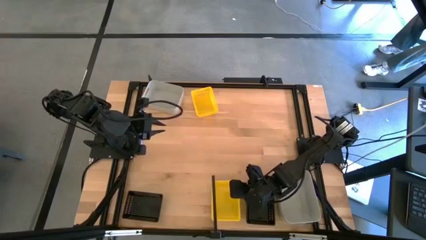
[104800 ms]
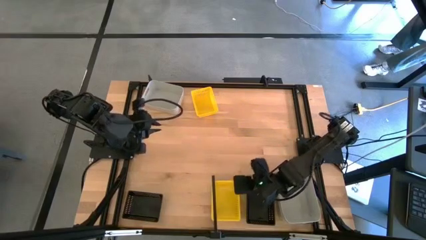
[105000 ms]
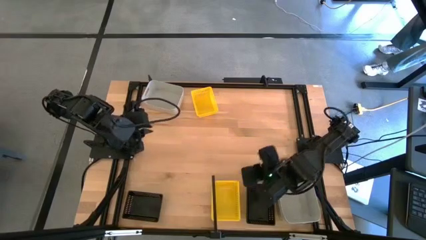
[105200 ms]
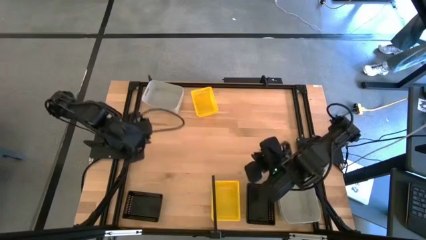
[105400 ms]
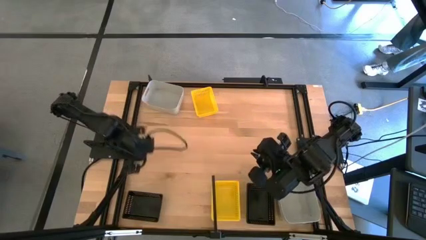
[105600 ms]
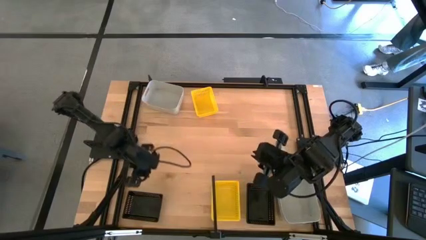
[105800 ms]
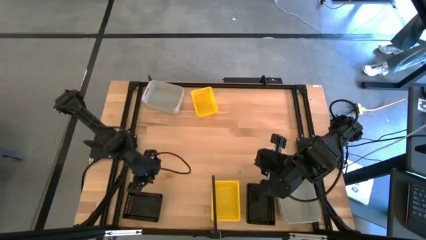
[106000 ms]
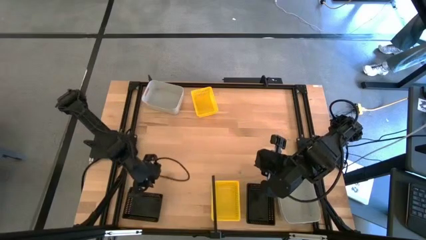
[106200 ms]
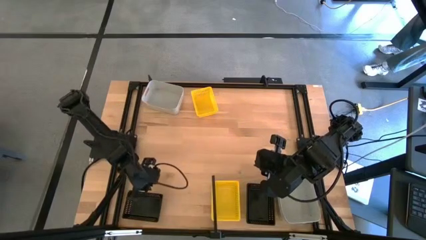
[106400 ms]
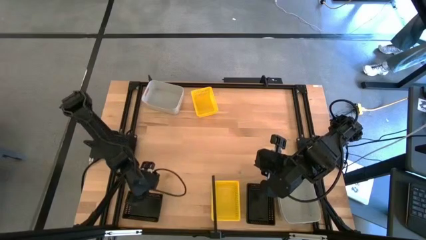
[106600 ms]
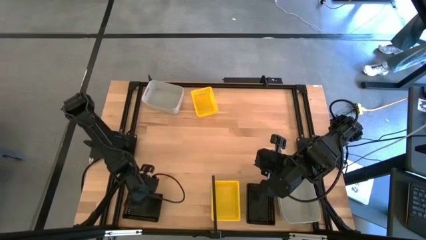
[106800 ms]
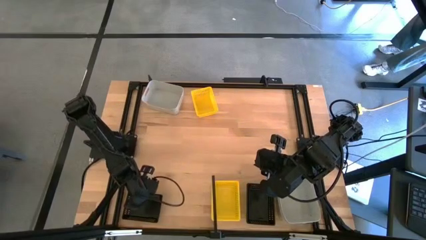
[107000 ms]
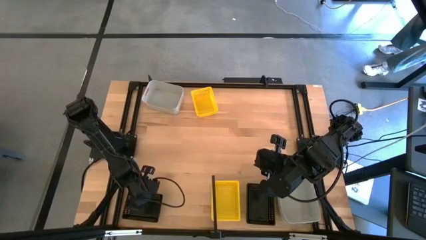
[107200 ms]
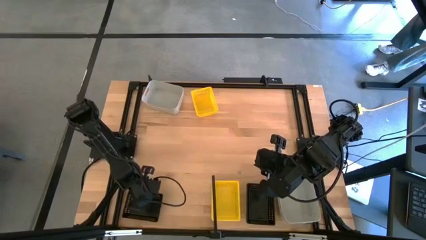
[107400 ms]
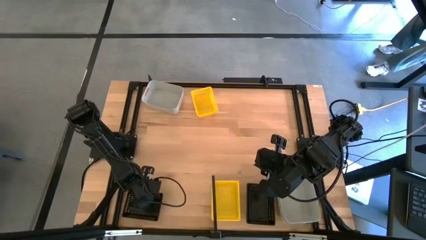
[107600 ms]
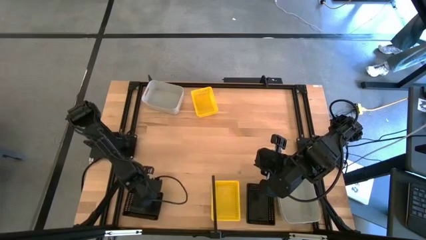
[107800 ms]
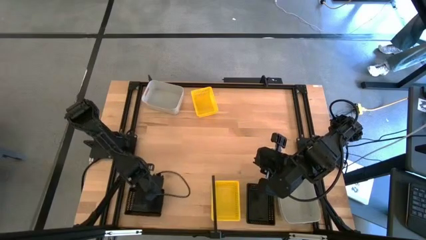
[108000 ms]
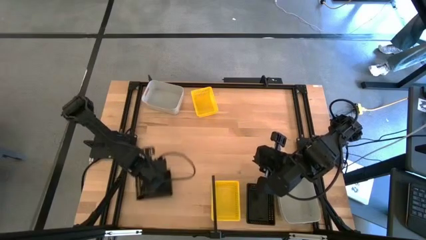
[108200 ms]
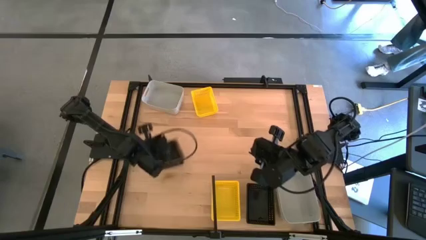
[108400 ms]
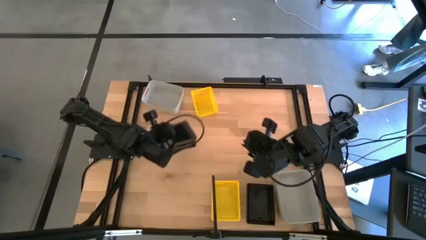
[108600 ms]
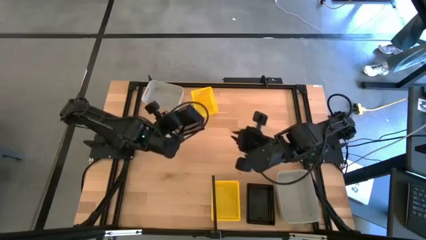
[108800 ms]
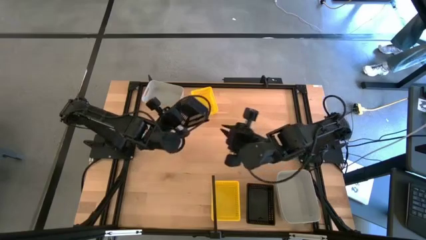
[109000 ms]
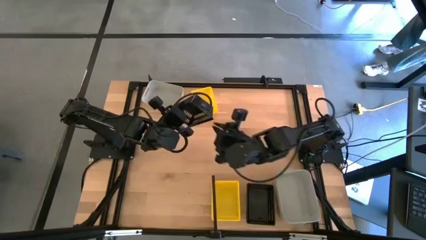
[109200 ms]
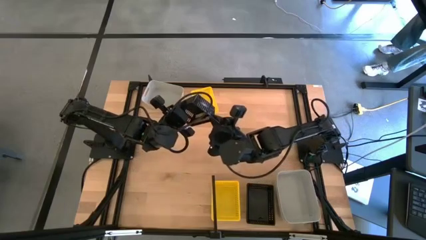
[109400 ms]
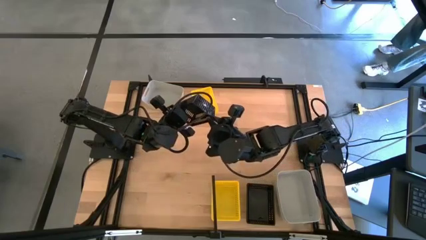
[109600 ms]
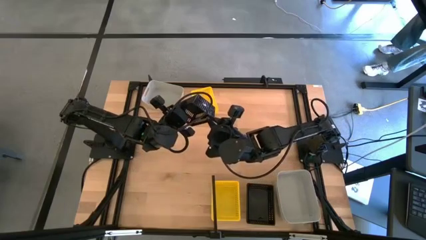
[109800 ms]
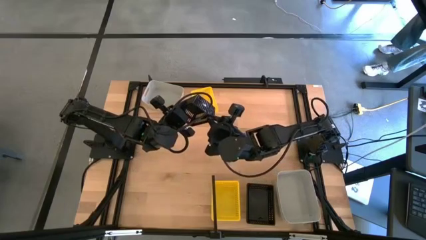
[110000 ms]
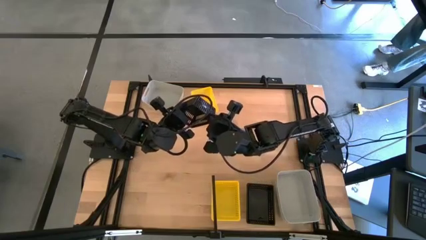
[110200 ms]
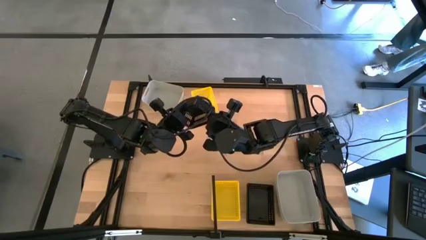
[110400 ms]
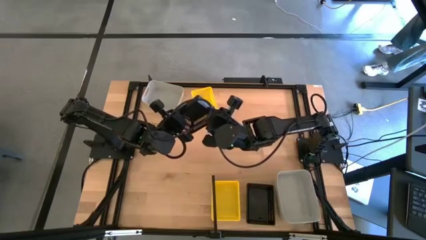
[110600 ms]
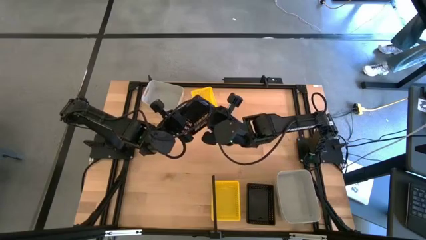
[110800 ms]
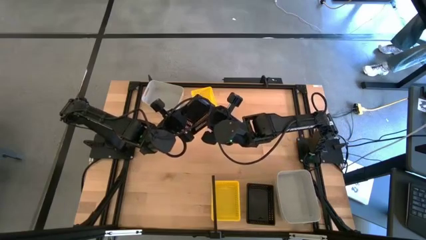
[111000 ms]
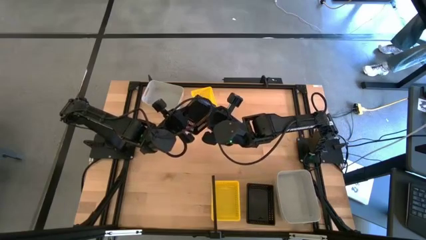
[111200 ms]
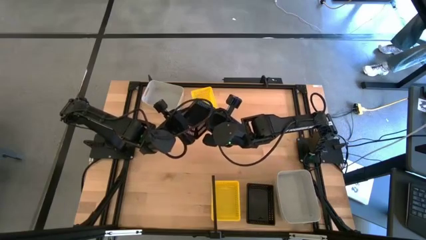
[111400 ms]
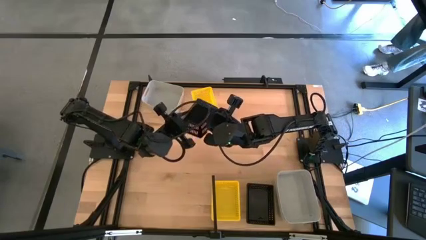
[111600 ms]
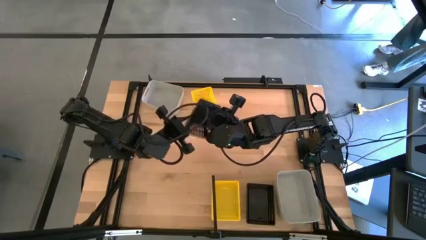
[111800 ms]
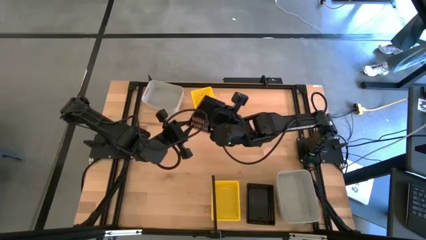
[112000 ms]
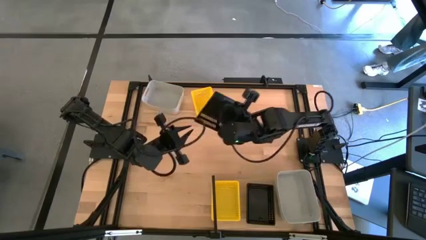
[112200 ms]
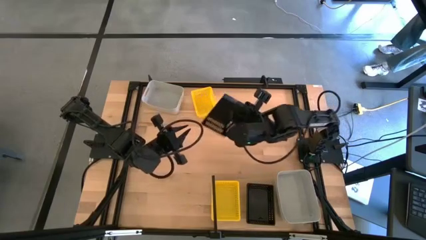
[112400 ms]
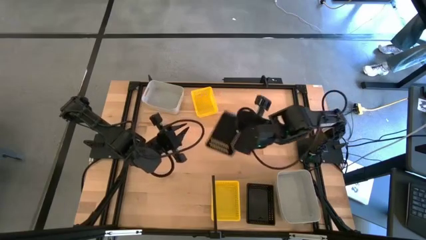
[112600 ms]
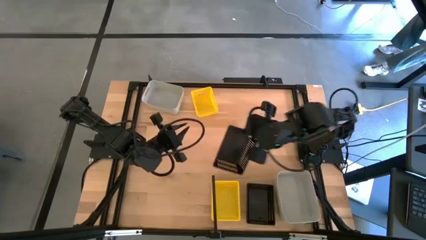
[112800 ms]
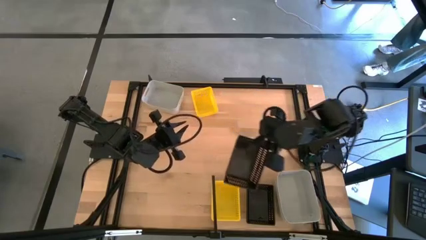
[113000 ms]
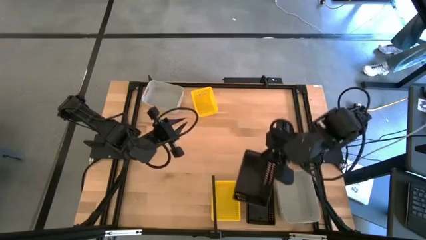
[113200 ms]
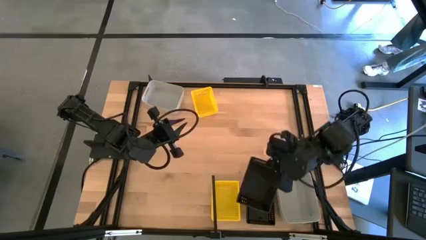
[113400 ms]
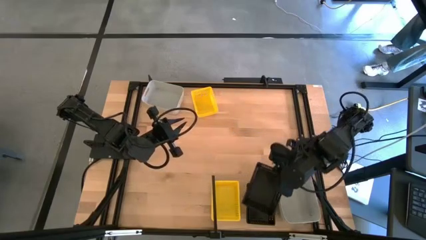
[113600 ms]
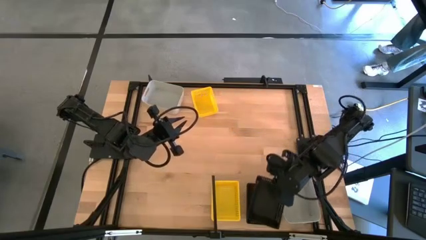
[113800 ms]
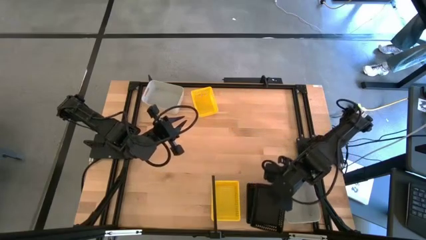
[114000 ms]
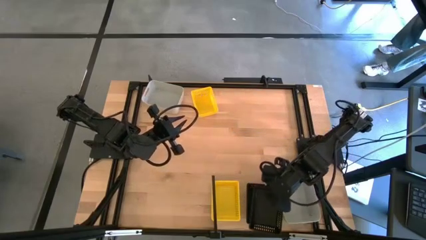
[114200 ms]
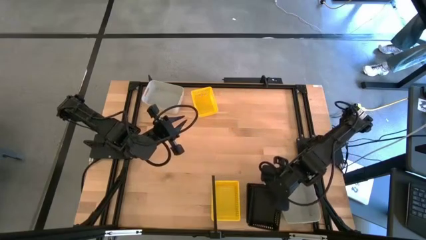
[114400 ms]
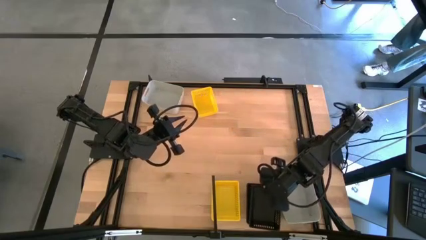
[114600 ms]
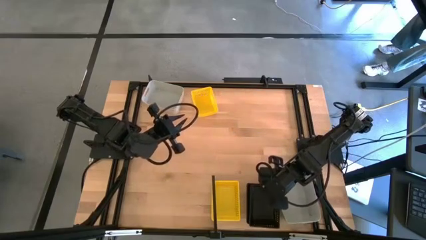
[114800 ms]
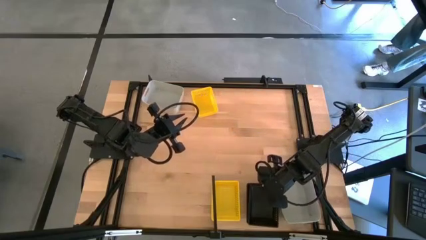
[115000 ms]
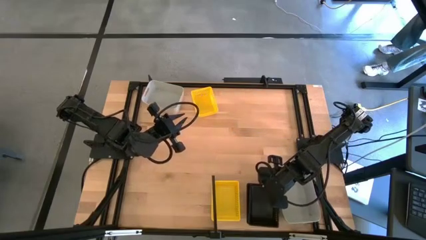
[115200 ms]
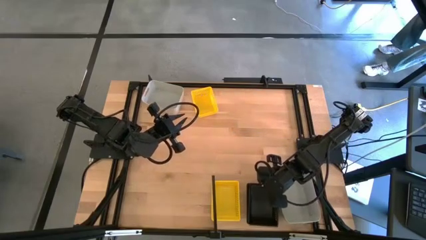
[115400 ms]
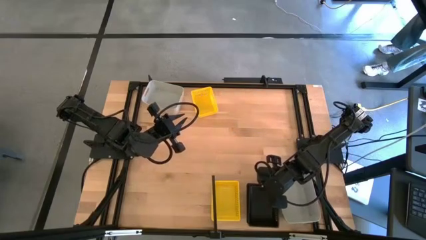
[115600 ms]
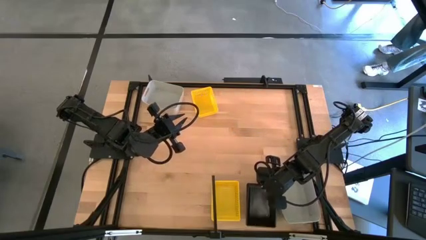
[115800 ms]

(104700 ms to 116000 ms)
Task: Stack baskets on shelf by color
Stack the black bin on top of the black bin on the shelf

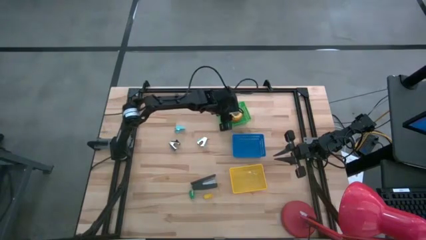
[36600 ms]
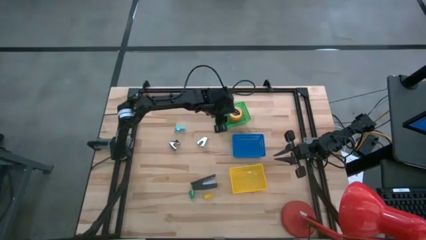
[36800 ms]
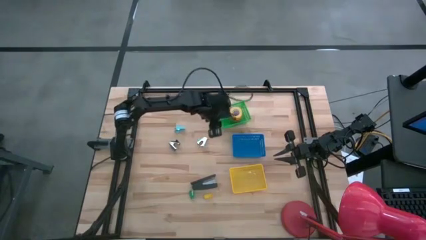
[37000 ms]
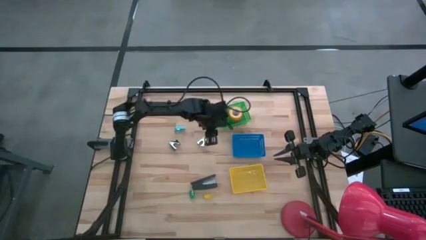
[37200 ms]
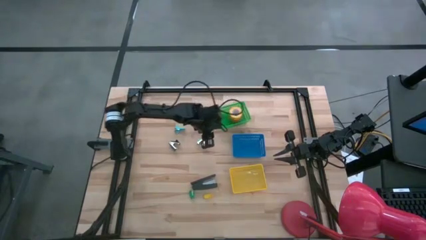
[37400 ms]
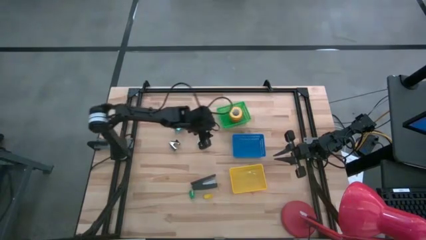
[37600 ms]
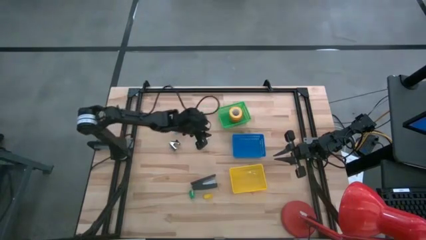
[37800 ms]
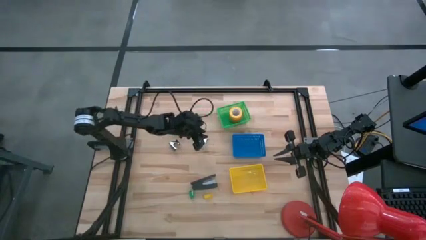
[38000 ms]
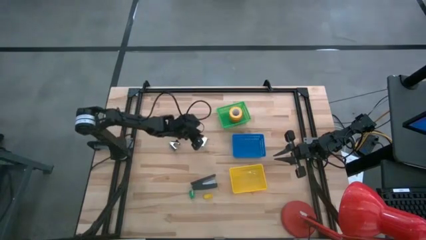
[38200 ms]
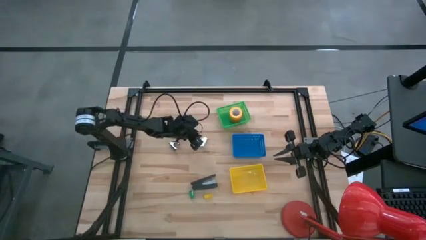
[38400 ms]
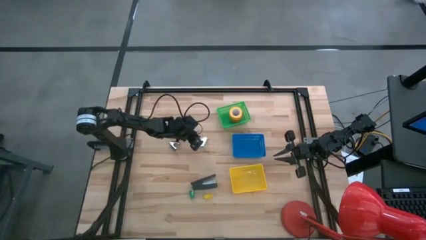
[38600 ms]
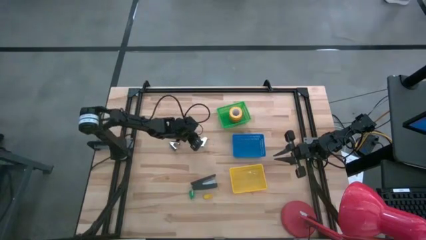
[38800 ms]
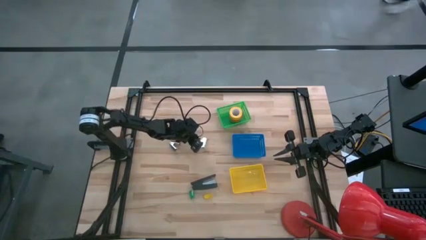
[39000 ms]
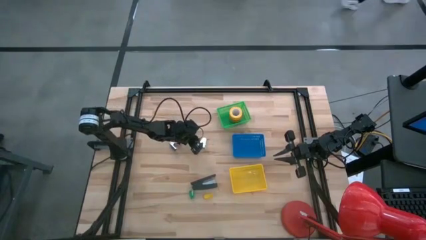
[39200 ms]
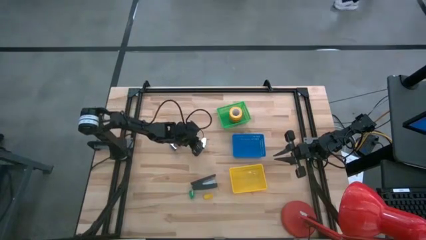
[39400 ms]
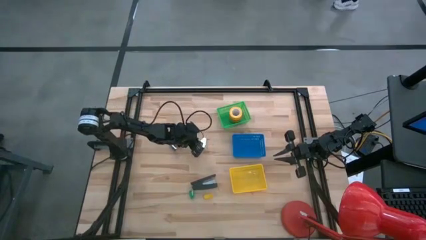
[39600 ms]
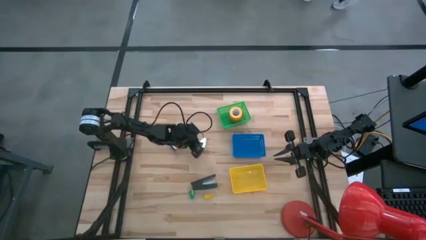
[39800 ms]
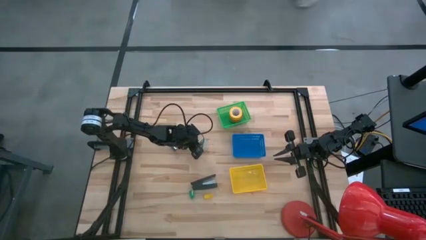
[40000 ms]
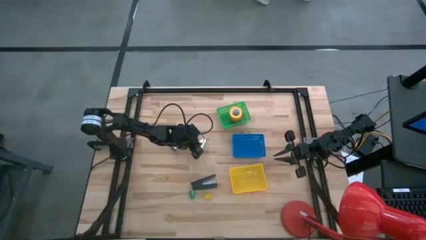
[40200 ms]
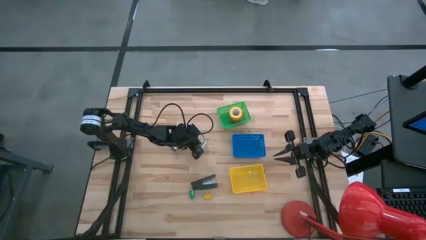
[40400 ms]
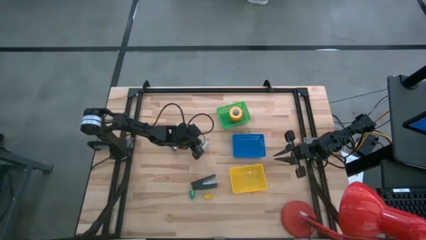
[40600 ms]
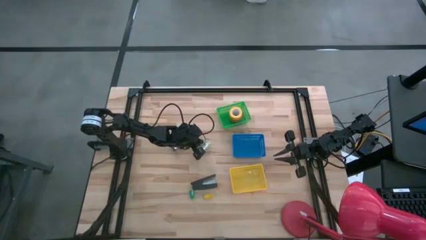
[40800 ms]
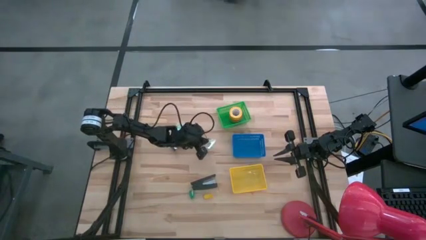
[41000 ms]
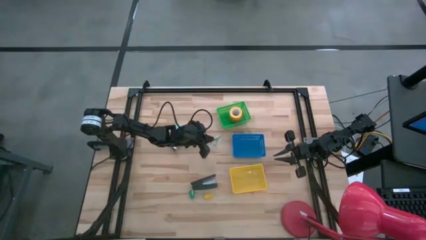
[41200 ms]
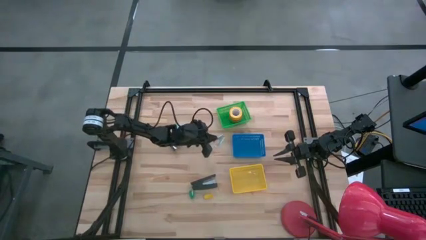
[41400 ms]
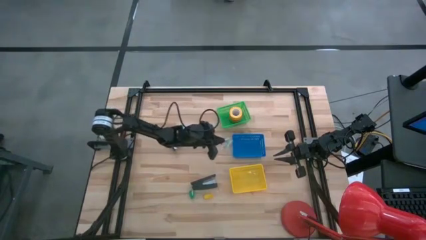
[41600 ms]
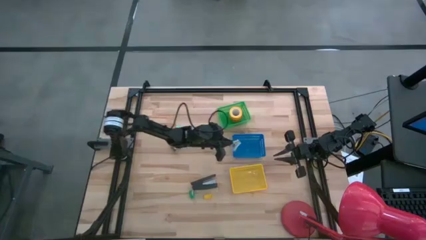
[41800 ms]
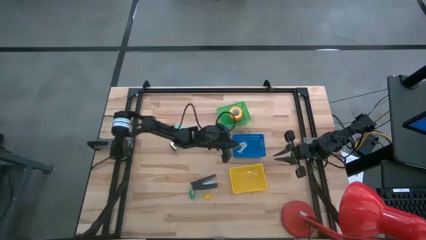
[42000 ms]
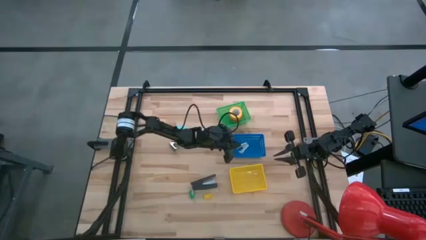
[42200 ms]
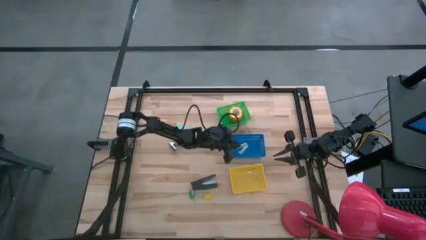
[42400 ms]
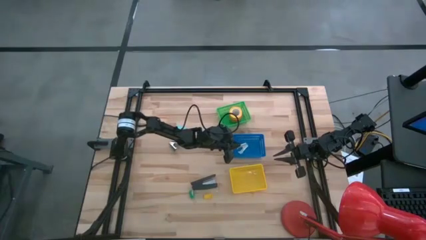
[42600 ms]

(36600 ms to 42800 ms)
Task: Pick and place Stapler, Stapler remover, tape
Put the bottom light blue staple remover into the blue bin
